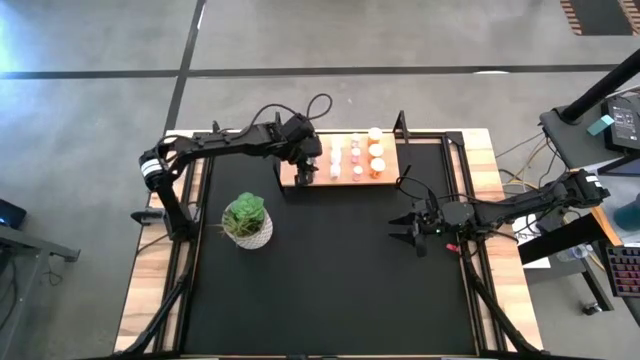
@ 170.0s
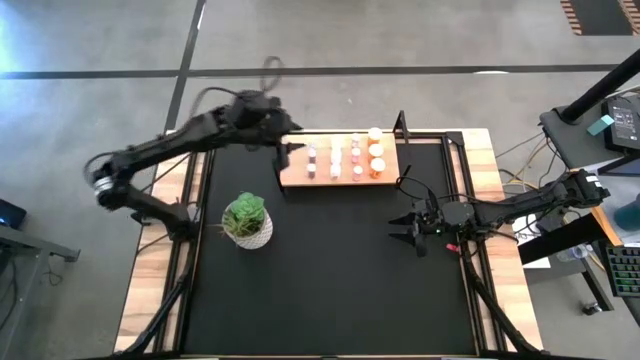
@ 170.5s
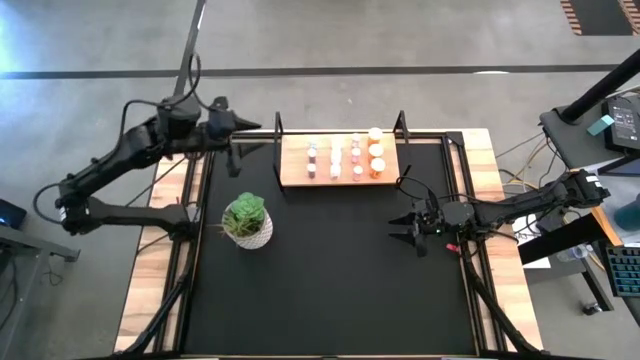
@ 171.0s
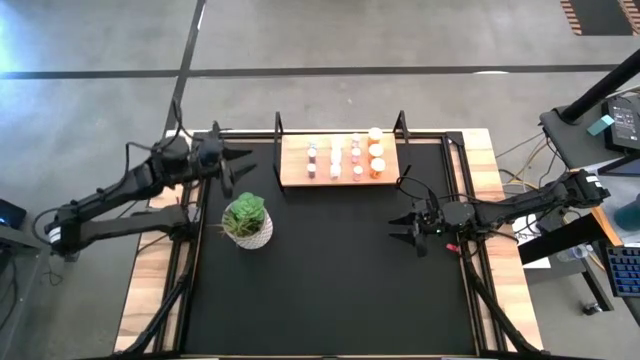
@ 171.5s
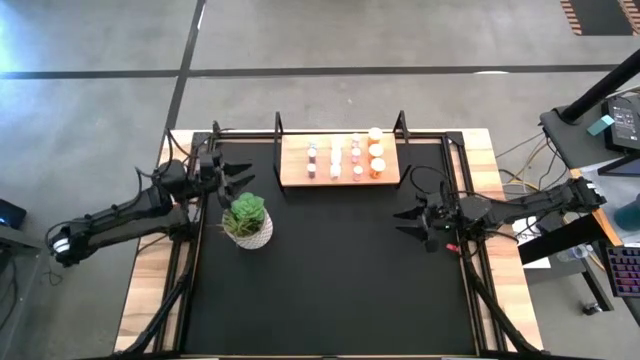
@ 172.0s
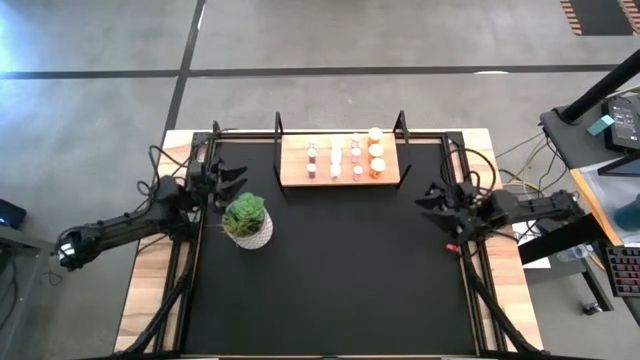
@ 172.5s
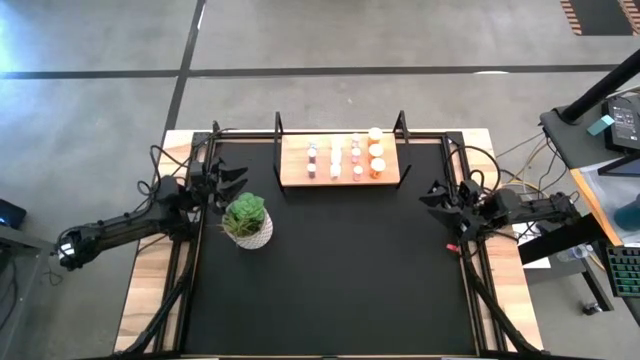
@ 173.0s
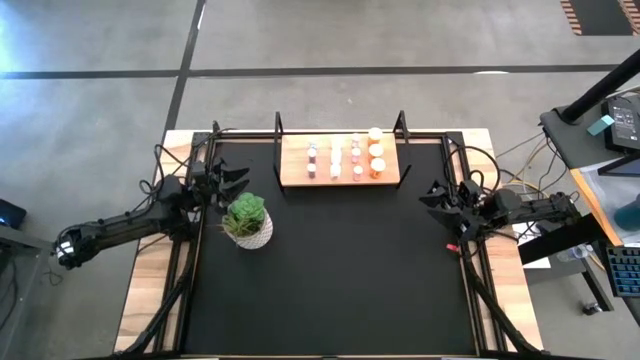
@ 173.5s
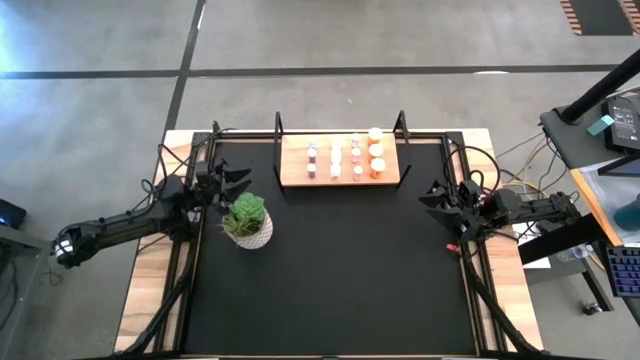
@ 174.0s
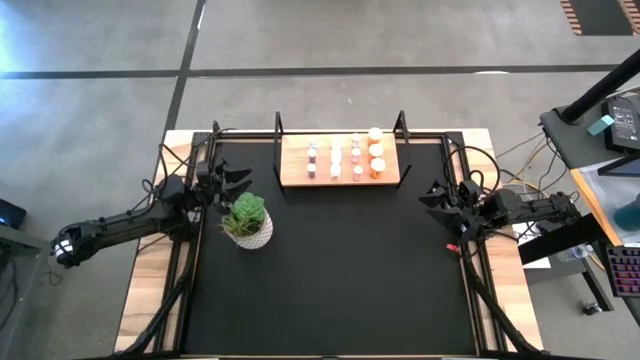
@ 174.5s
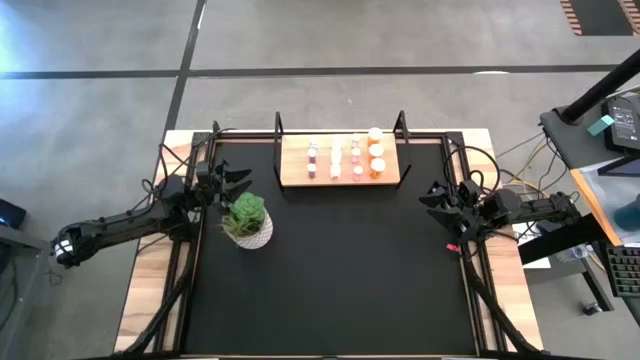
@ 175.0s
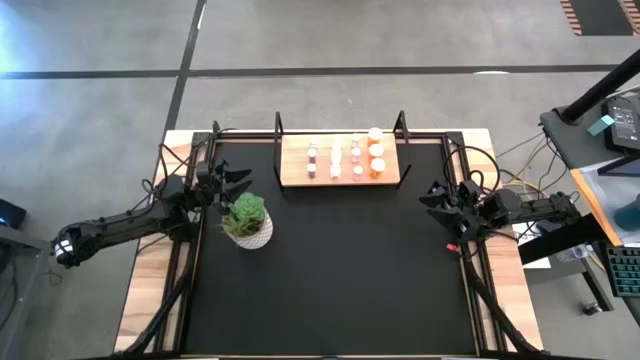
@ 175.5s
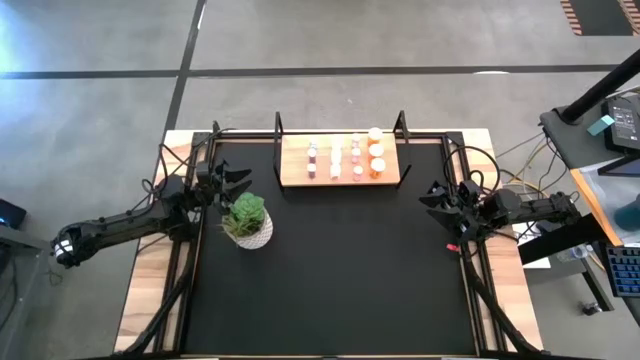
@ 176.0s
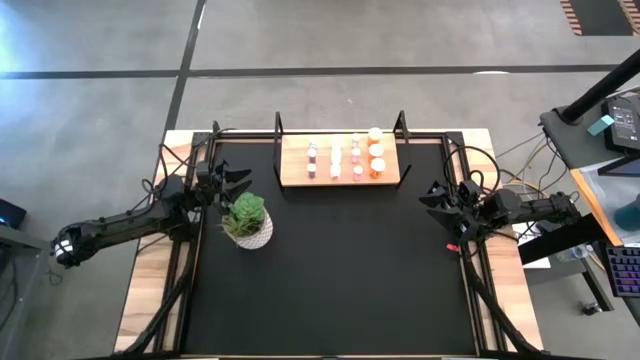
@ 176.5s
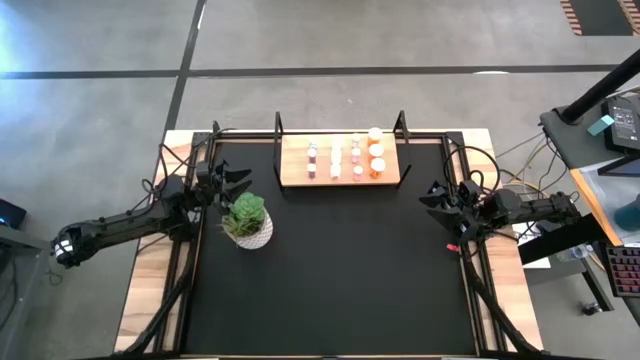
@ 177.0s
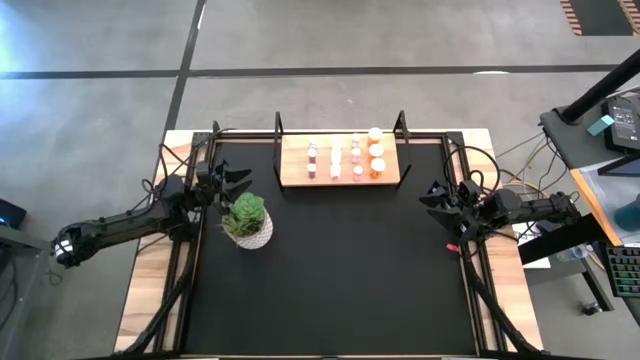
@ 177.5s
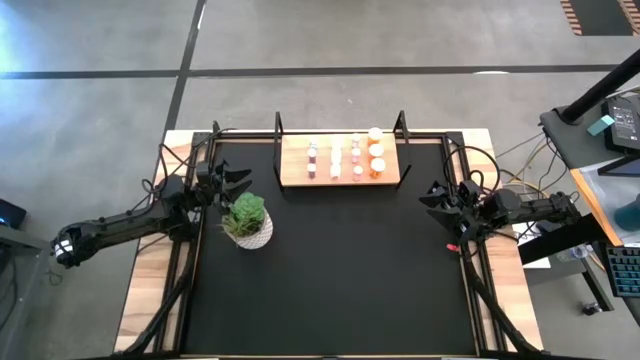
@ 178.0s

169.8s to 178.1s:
Task: Pick and place medicine bottles onto shelf by color
Return to Home Position

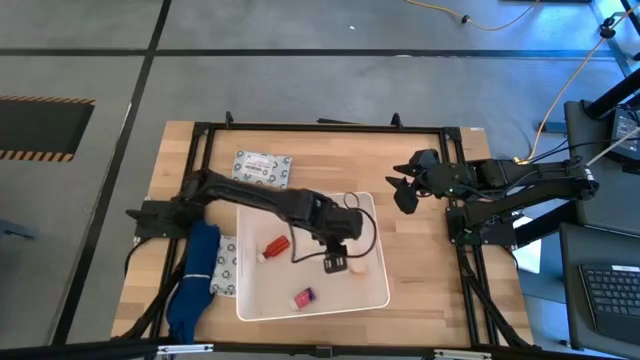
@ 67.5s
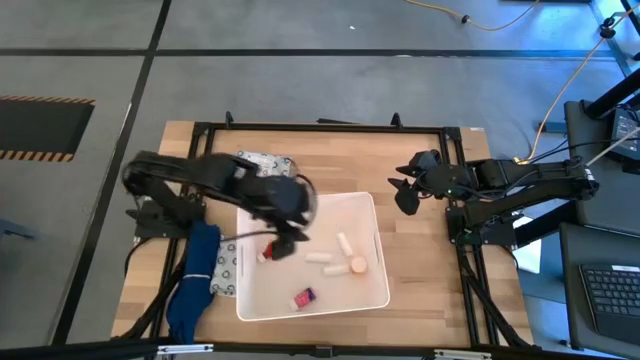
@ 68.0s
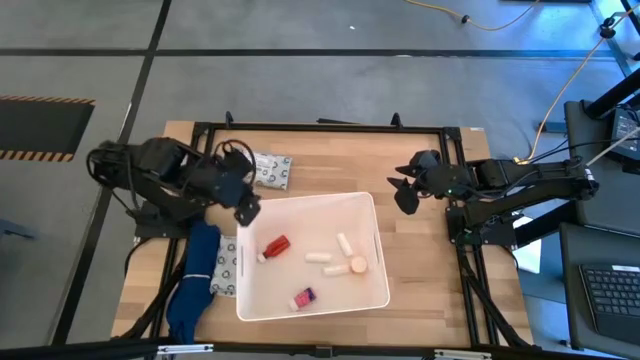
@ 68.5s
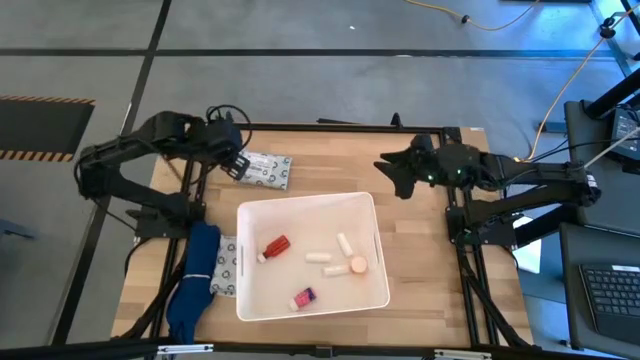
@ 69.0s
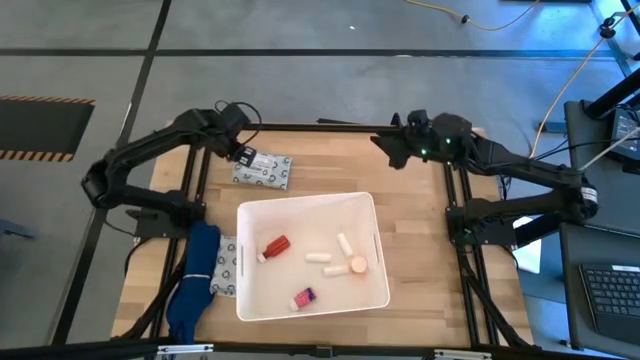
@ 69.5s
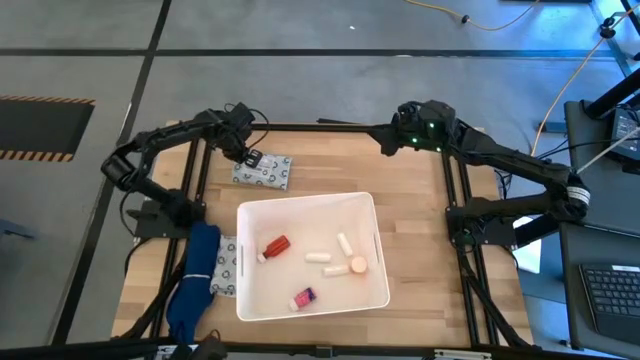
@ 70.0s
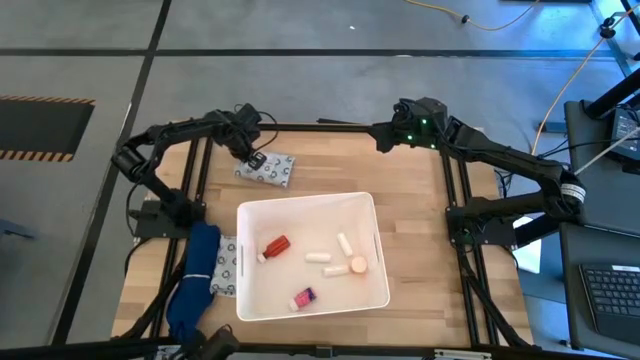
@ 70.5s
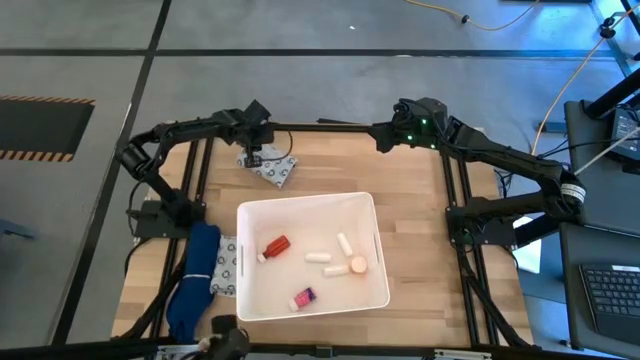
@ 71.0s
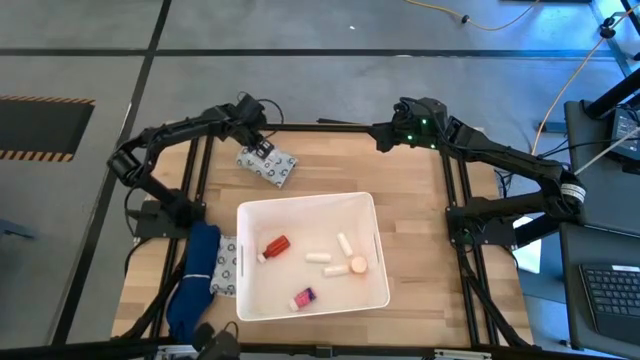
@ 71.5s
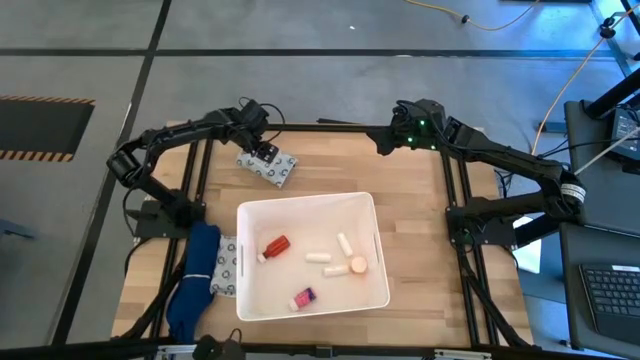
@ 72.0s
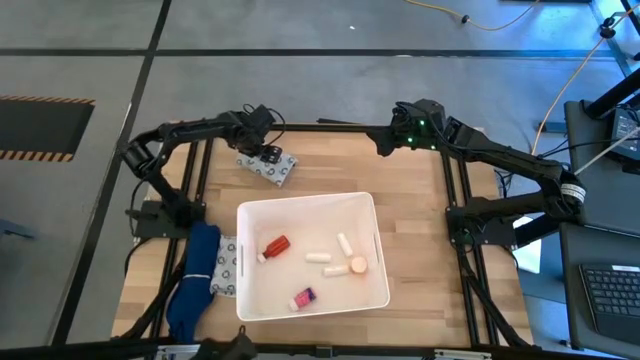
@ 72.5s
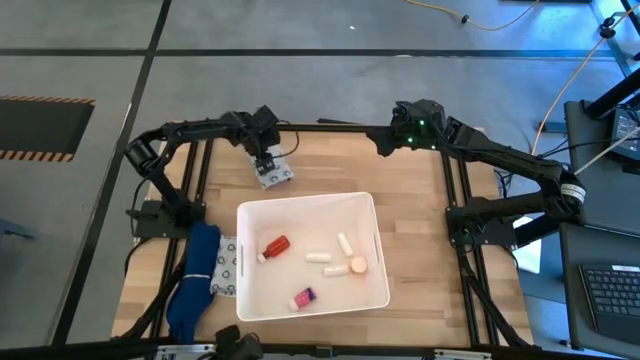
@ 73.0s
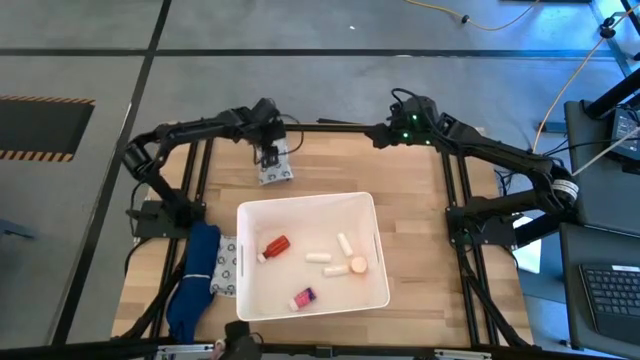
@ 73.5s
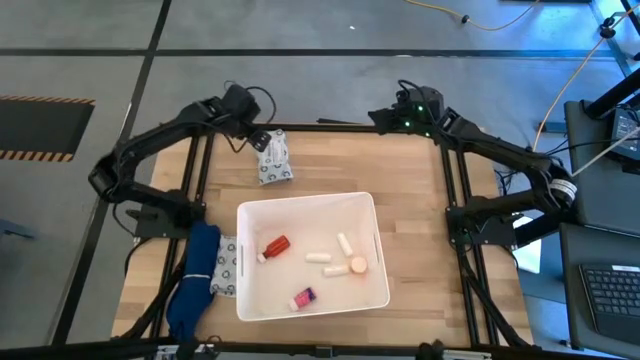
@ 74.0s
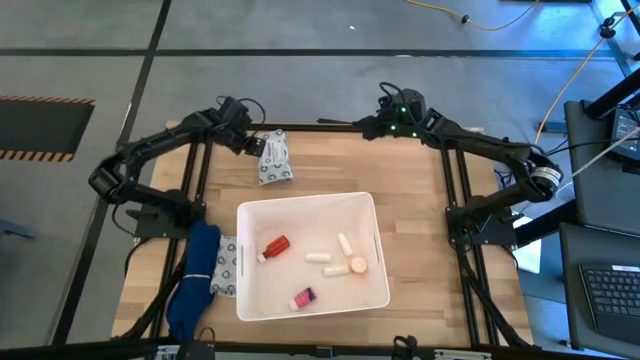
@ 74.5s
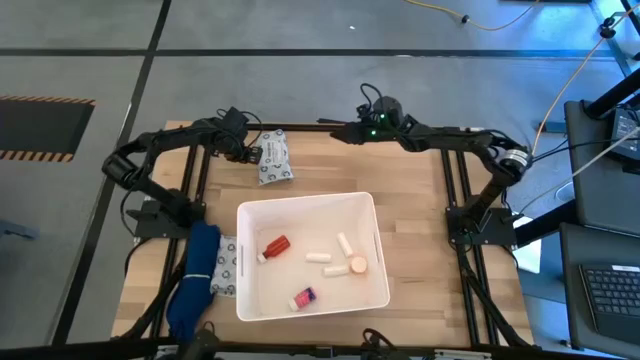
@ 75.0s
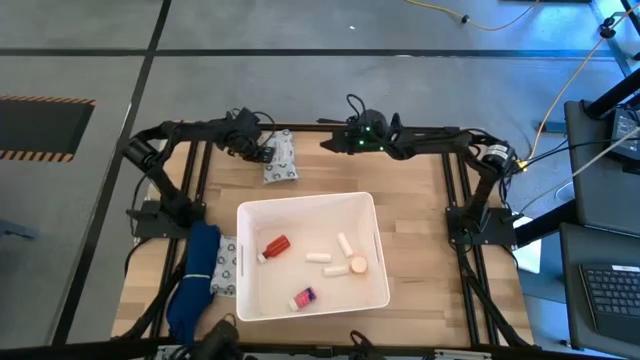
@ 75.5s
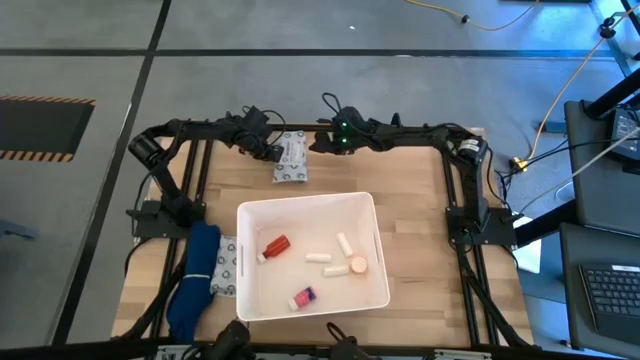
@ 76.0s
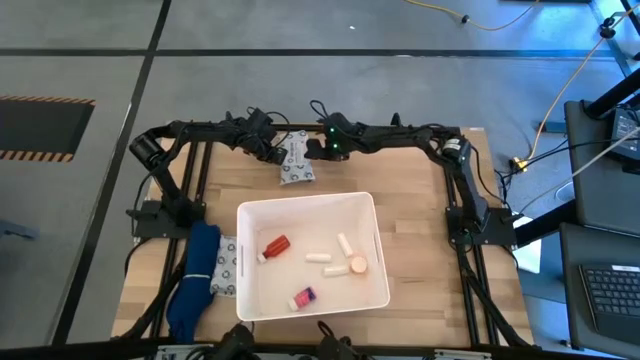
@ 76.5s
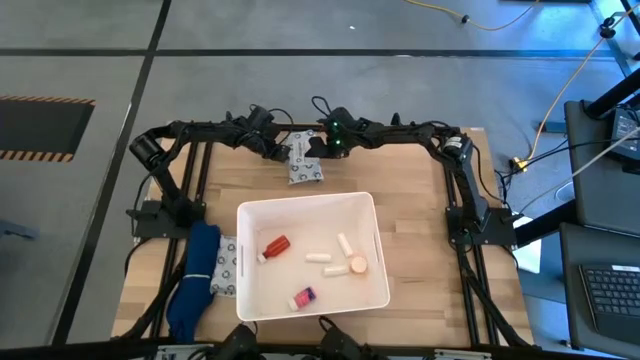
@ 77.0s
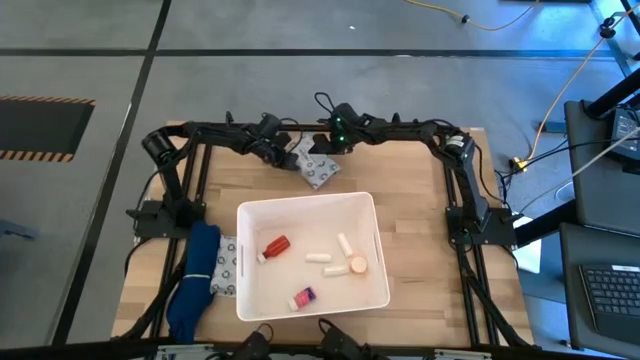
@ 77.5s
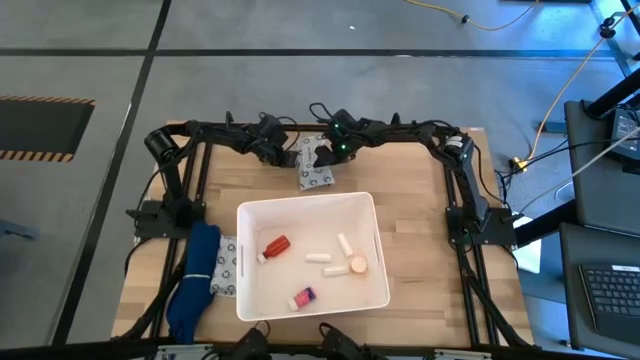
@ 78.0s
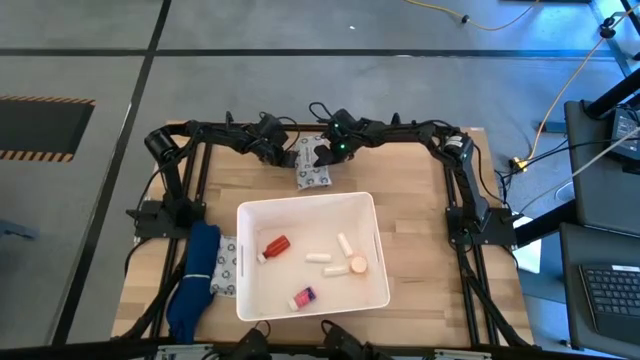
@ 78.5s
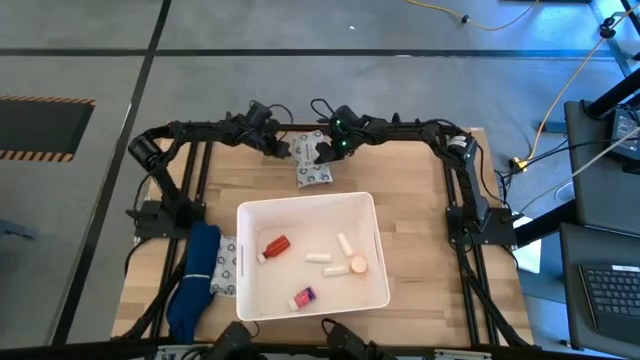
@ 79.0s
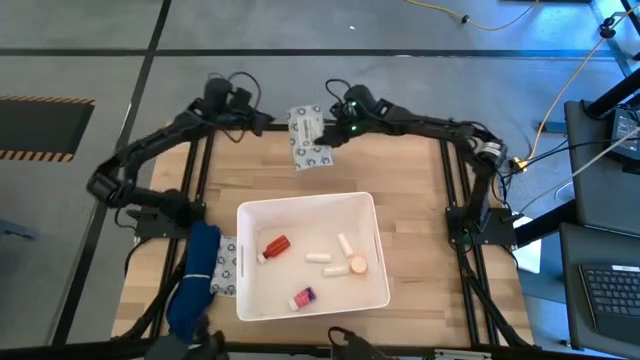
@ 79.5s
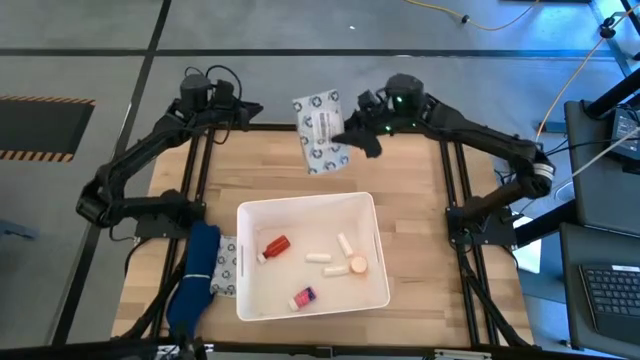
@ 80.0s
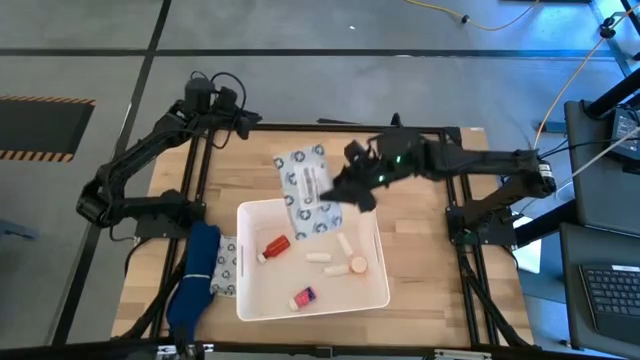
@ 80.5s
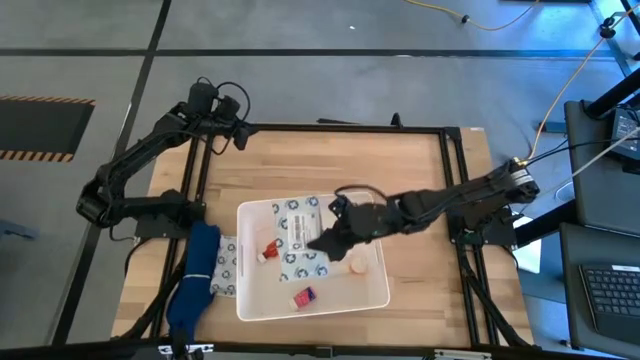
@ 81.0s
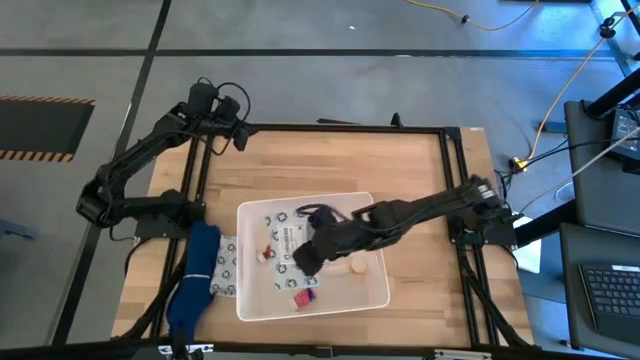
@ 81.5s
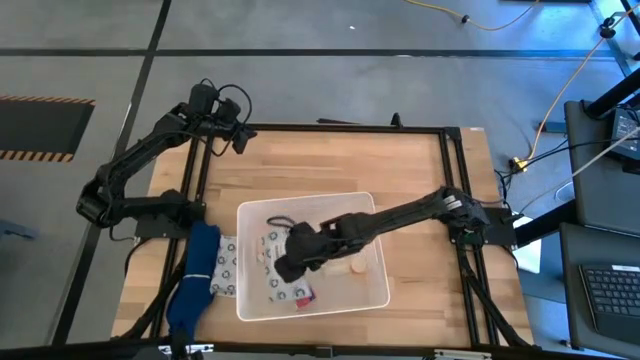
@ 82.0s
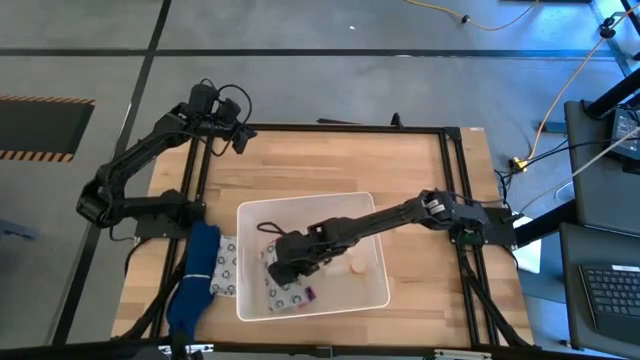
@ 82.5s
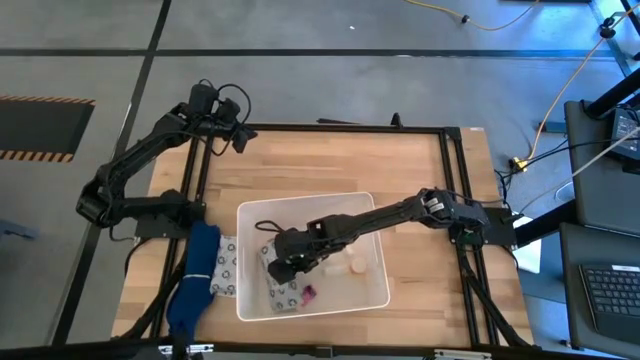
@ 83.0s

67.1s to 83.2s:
Task: Pick & place medical supplies in basket/bin
Put the top white mailer bag into the white bin
